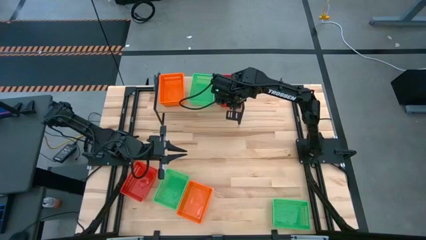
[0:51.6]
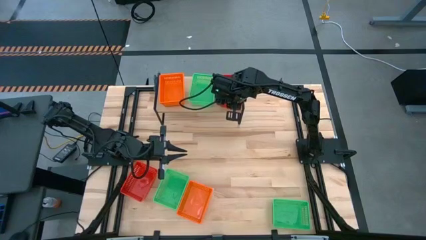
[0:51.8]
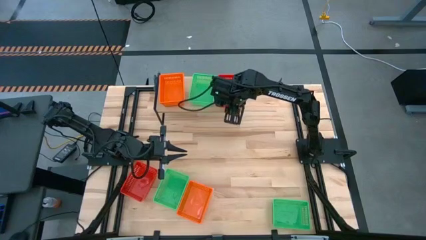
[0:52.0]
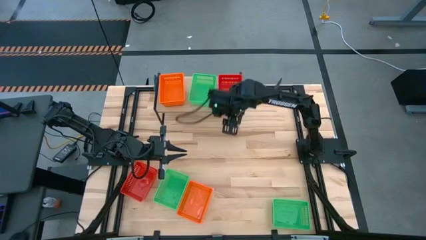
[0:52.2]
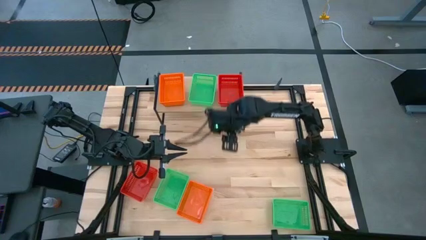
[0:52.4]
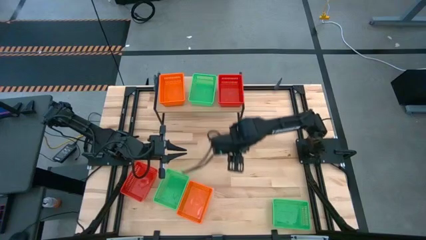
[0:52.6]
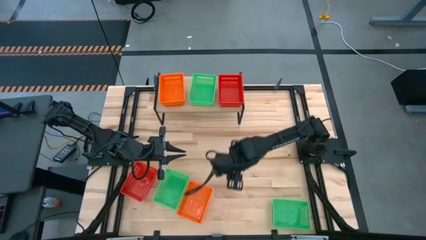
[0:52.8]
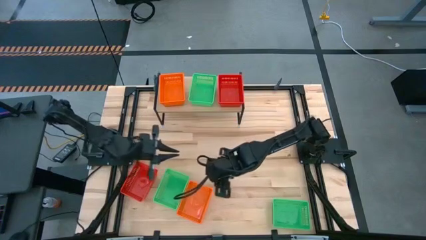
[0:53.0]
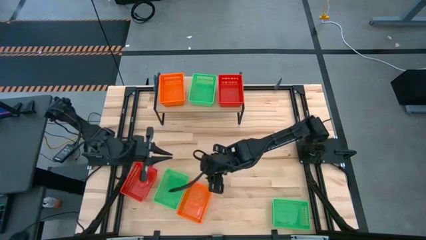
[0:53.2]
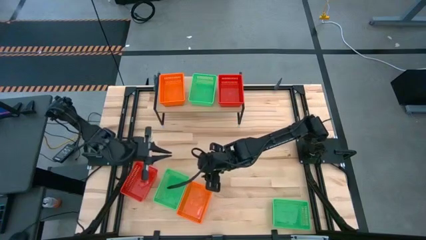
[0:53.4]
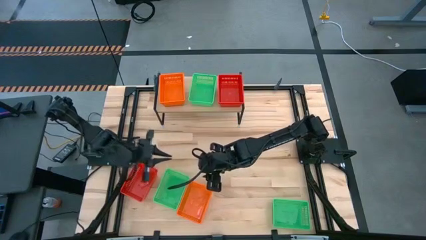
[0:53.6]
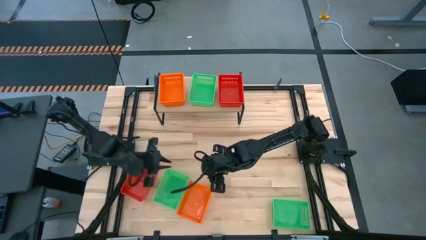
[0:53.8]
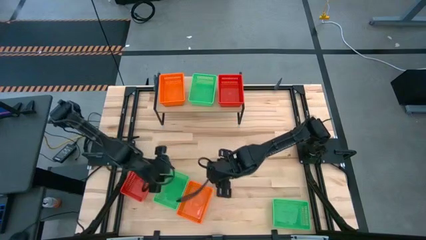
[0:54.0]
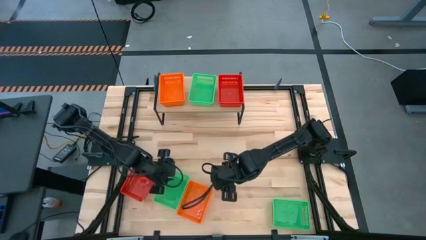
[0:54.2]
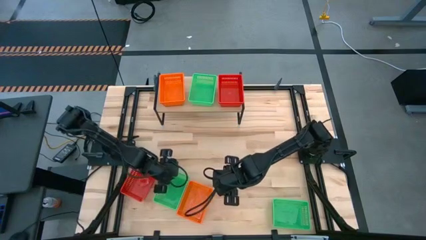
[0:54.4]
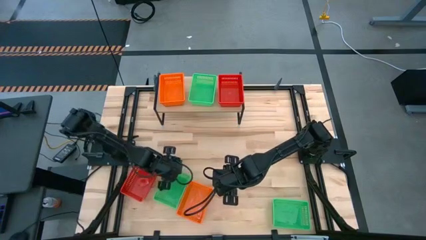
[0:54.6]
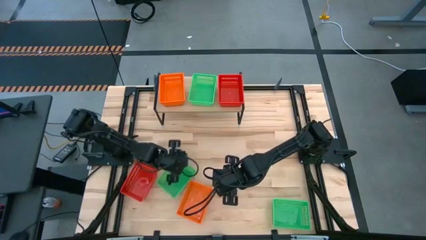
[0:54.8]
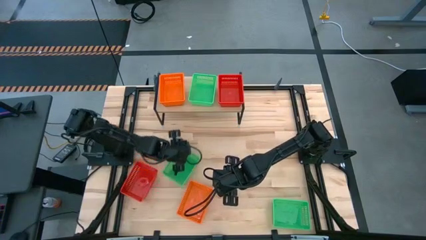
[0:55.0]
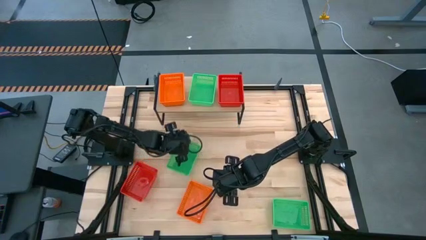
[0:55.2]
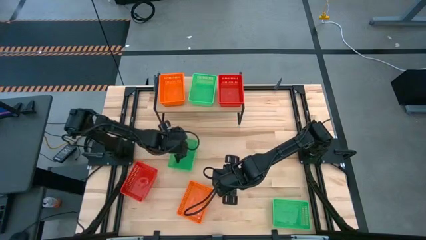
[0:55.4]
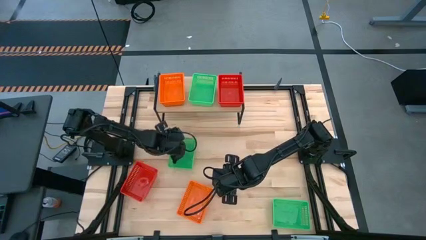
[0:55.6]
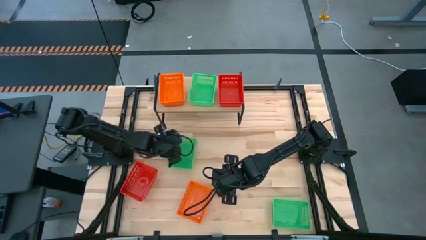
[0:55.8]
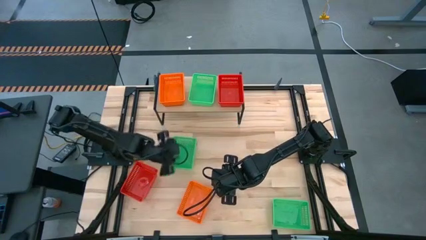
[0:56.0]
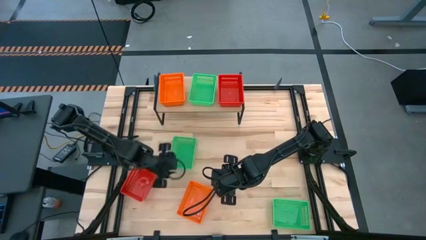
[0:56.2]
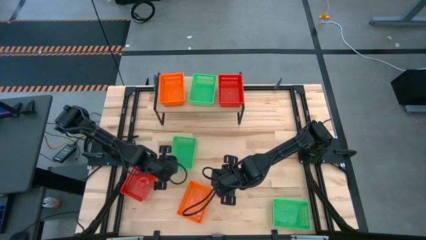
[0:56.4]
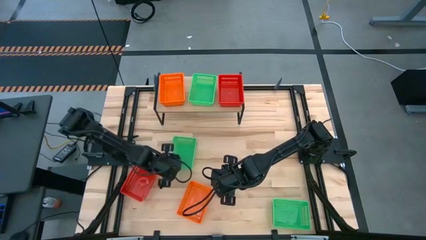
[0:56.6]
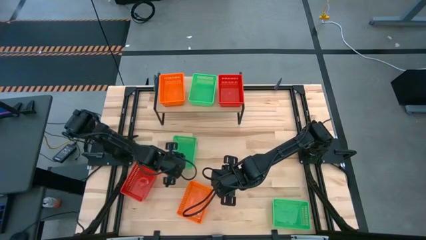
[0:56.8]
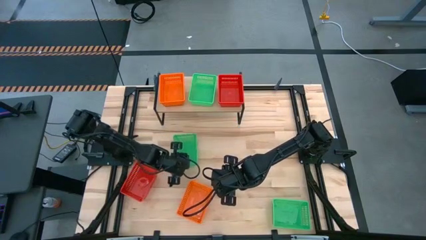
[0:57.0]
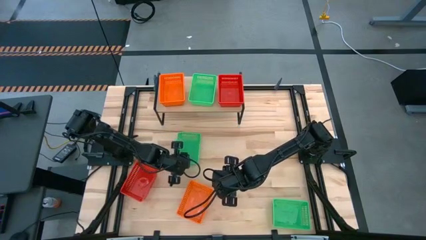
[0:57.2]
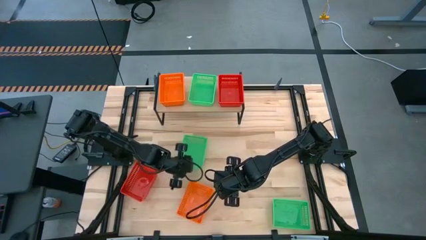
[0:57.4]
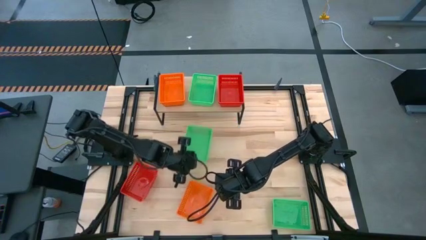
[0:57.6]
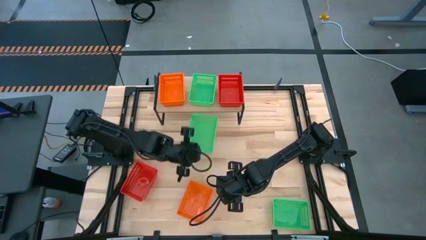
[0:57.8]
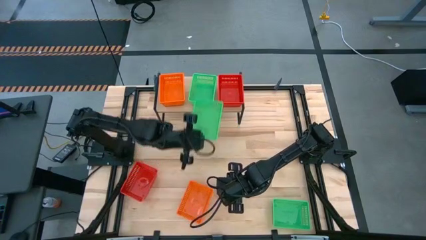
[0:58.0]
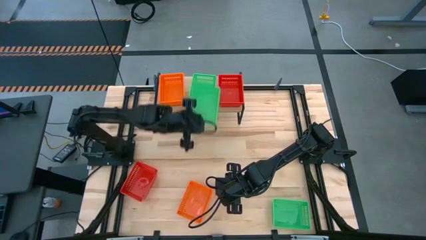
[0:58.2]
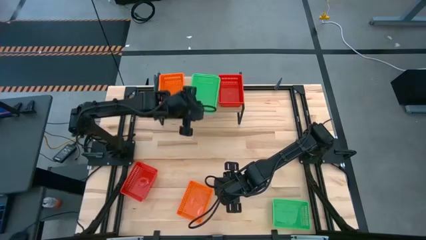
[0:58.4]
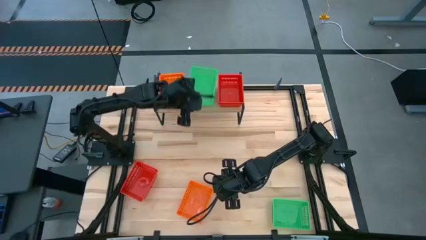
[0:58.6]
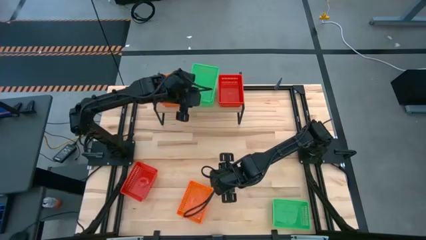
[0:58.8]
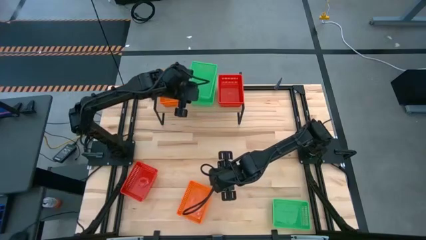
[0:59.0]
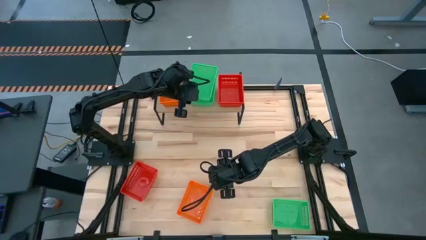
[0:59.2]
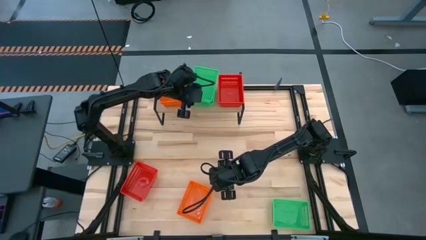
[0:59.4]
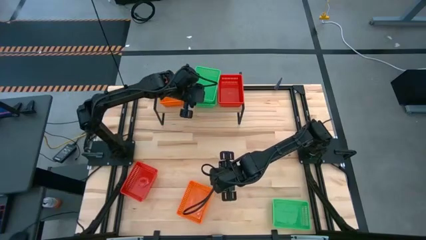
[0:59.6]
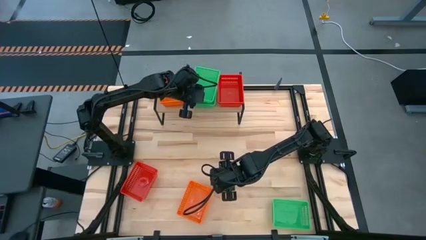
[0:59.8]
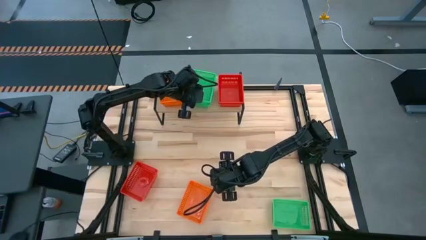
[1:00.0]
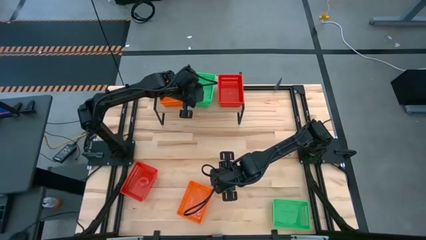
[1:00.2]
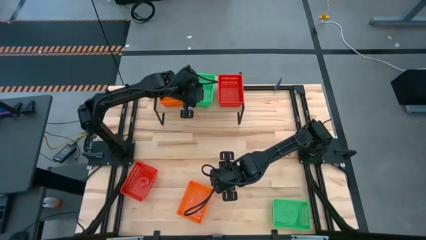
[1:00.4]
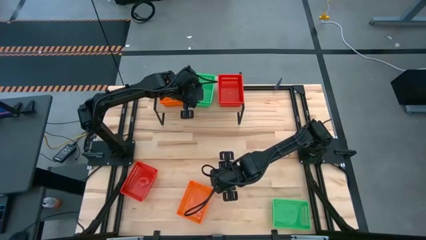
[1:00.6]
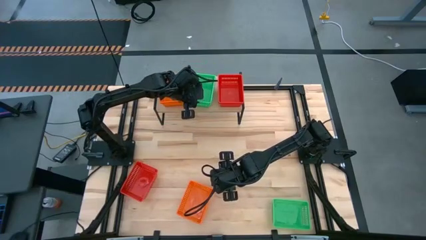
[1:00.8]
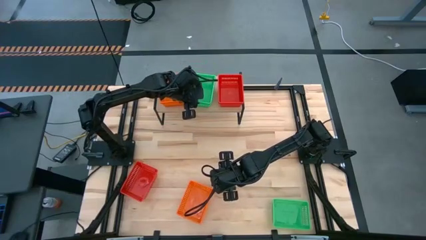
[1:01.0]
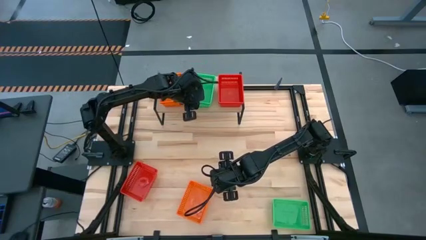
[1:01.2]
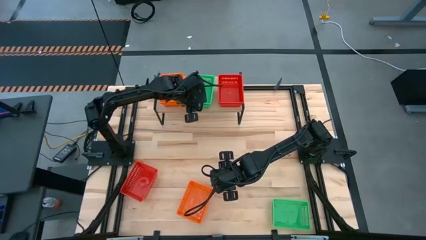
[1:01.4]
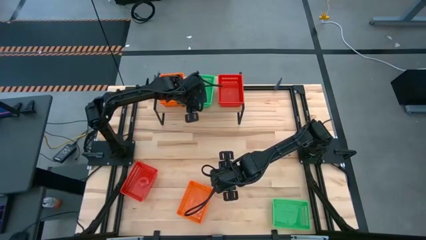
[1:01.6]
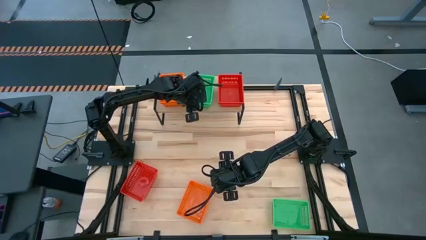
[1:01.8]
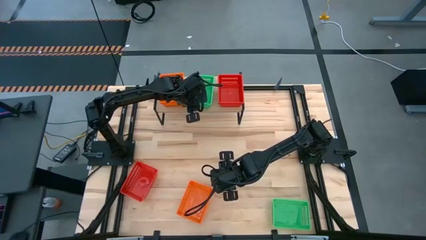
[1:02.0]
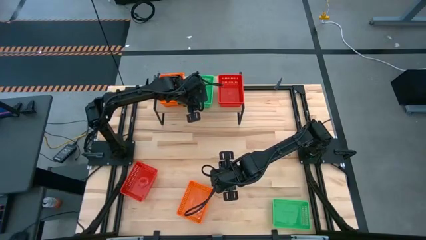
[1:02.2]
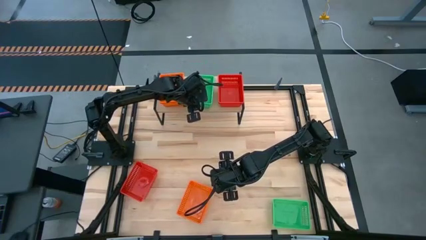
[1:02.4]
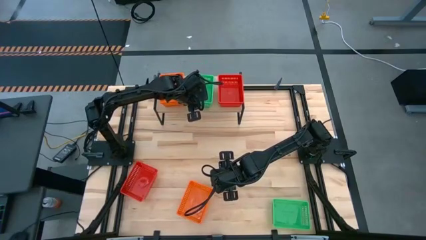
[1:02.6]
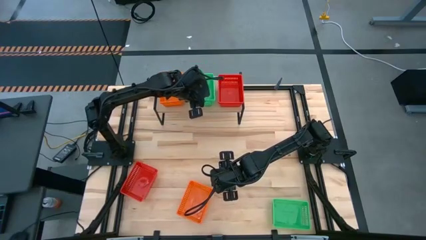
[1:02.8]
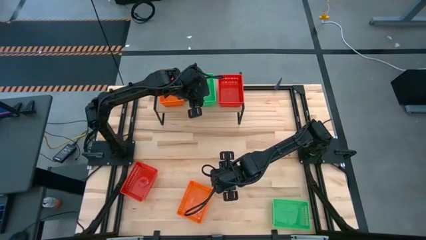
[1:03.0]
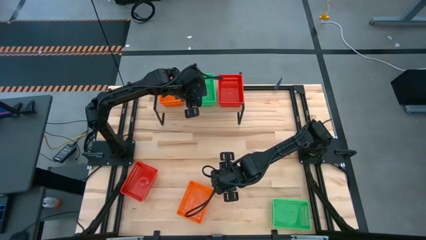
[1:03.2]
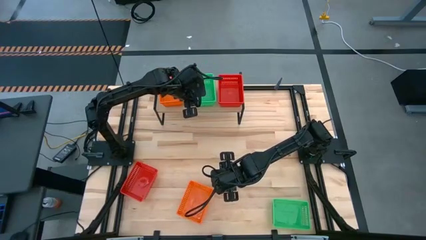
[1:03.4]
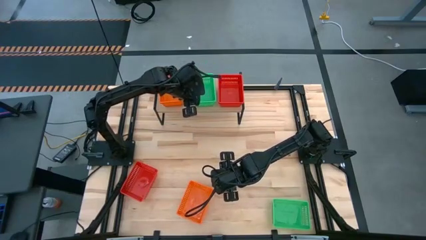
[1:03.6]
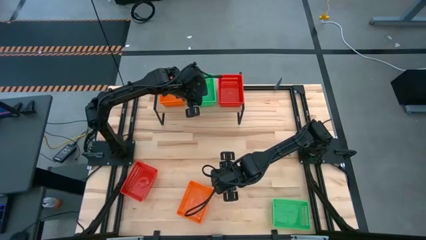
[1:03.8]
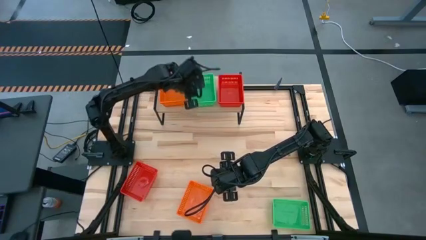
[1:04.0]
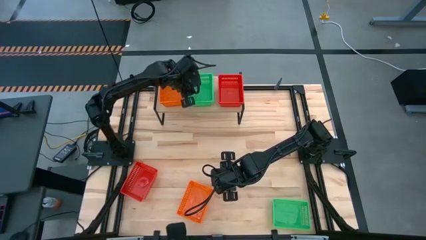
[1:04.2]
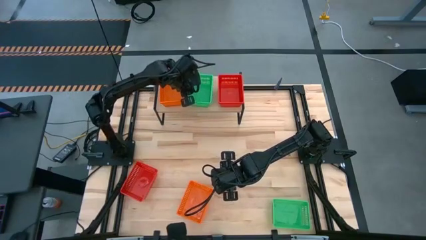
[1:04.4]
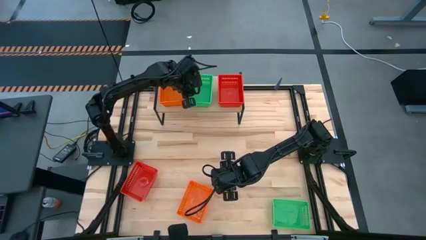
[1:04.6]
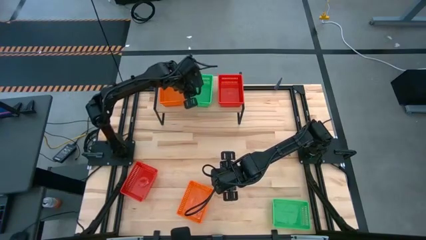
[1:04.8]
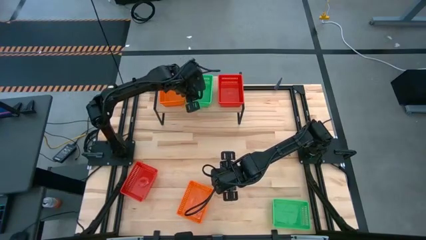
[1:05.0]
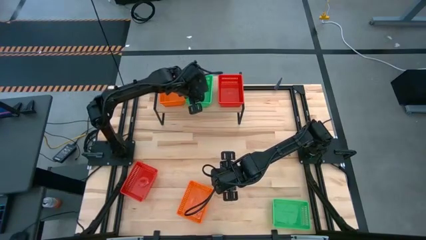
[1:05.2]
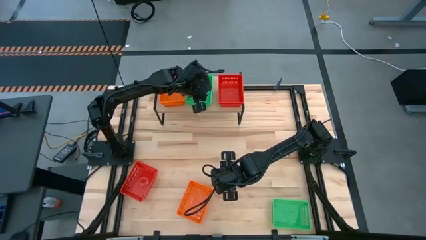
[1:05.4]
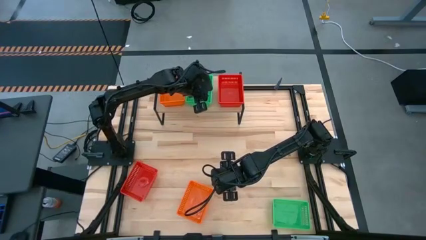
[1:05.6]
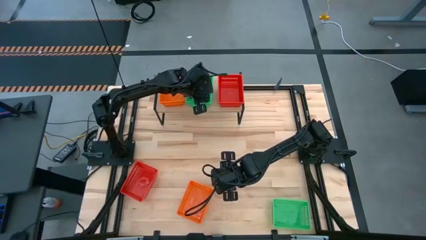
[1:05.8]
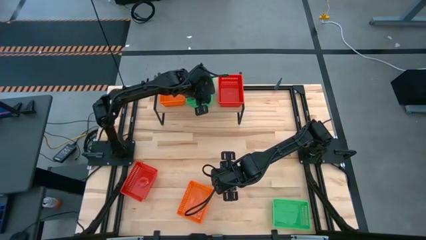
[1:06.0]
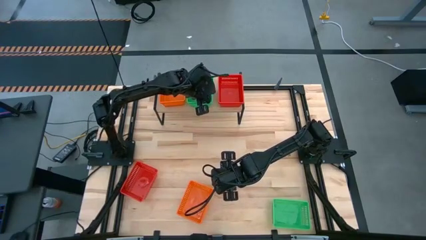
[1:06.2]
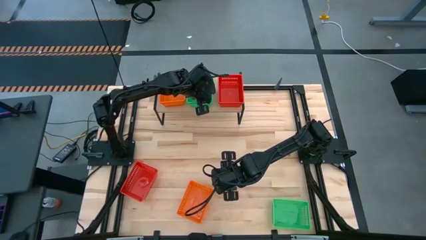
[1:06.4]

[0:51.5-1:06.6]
Task: Stack baskets on shelf by color
Stack the left green bin on the green bin on the shelf
